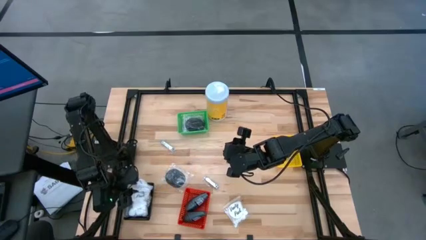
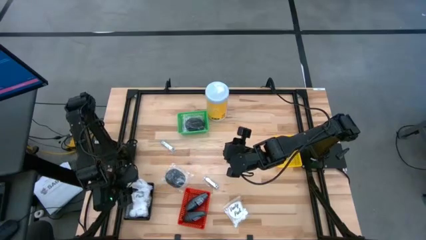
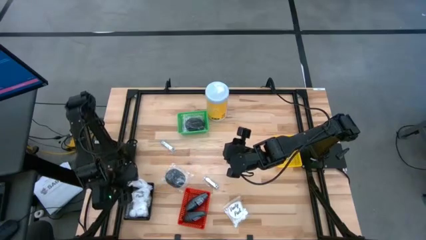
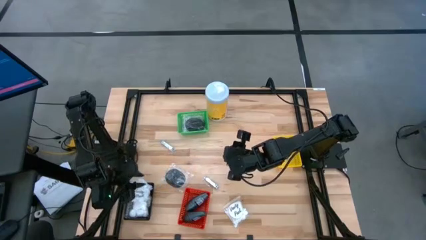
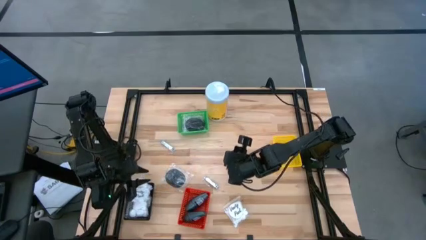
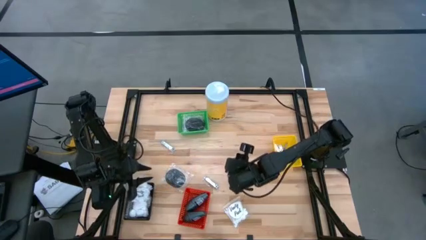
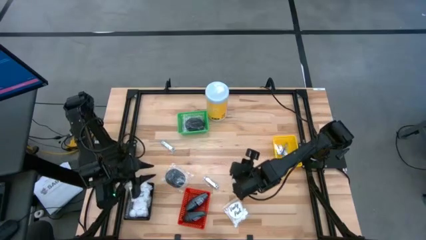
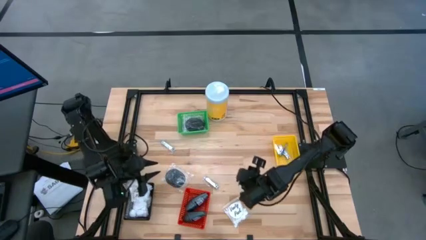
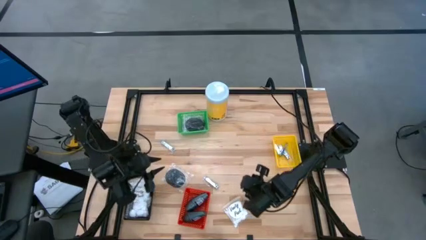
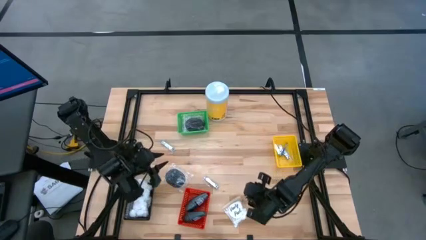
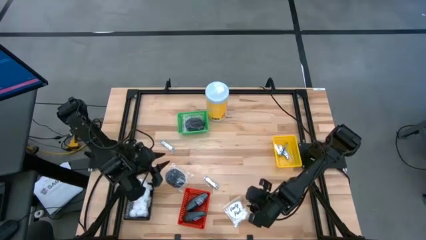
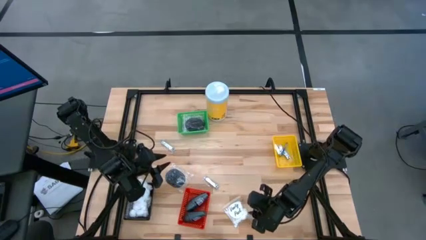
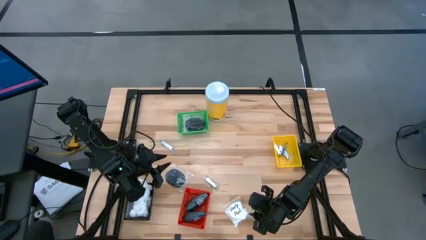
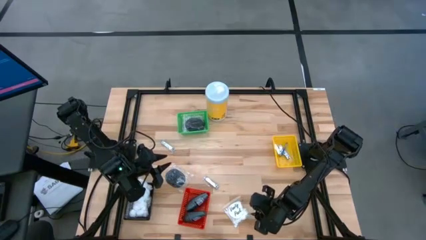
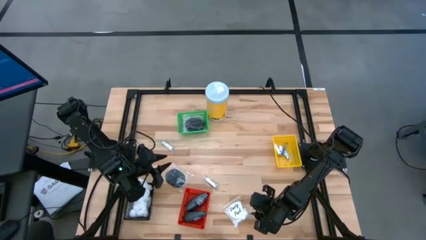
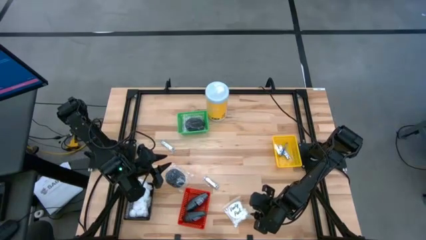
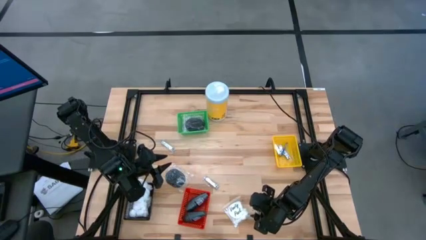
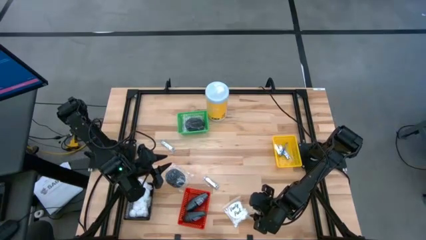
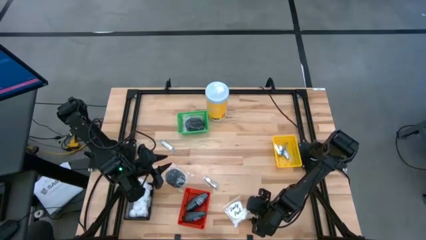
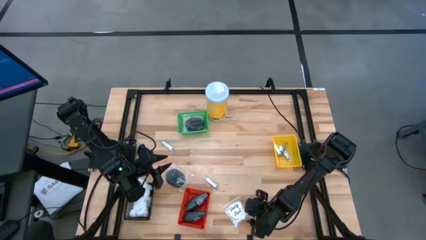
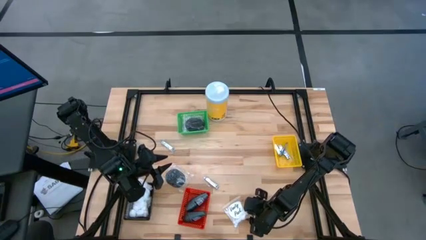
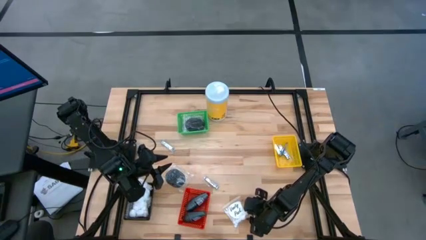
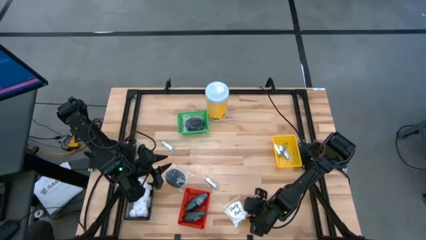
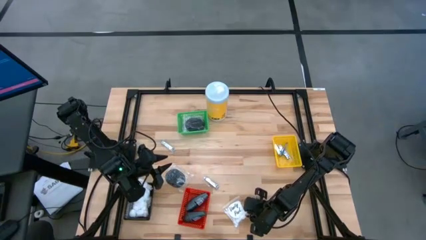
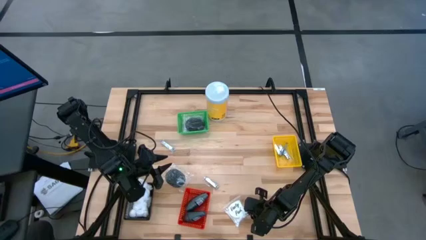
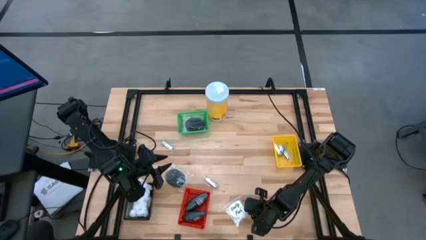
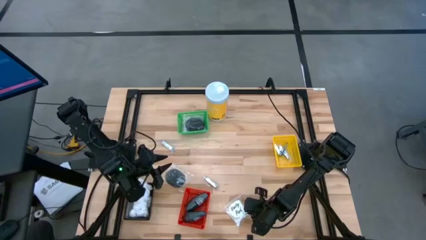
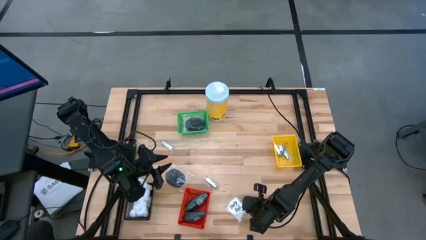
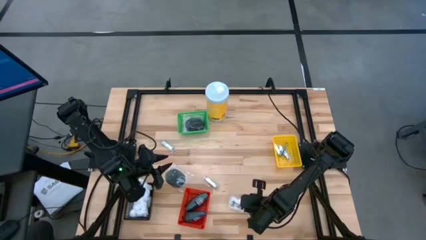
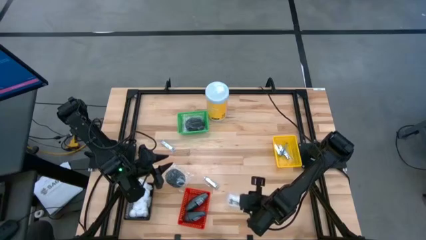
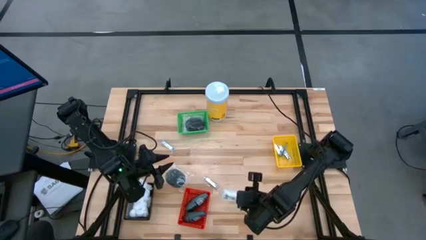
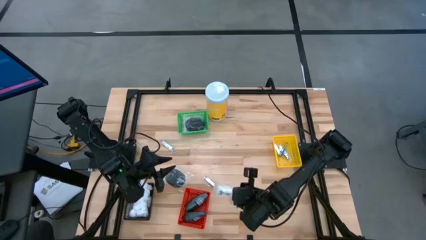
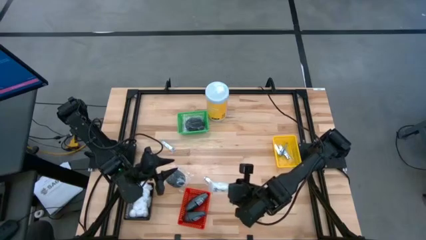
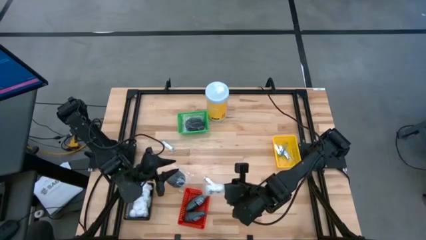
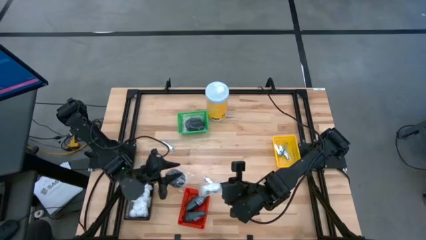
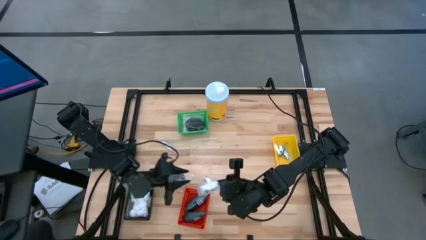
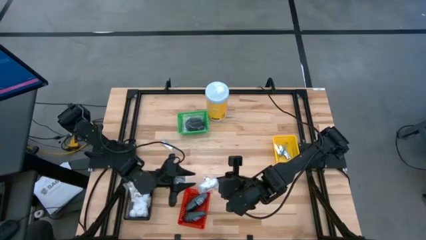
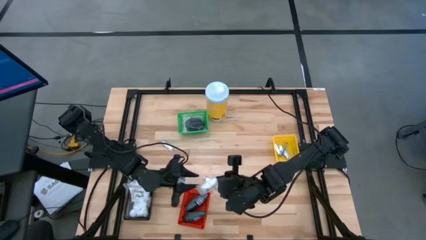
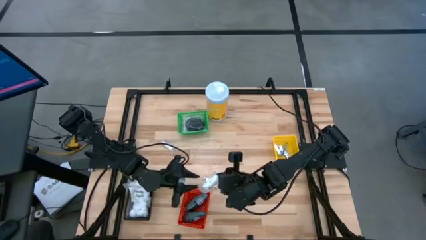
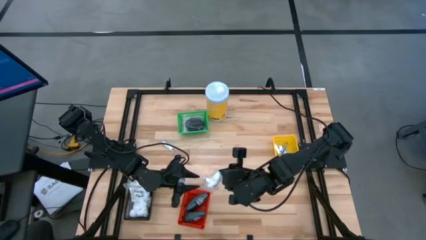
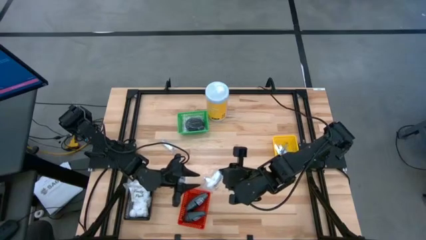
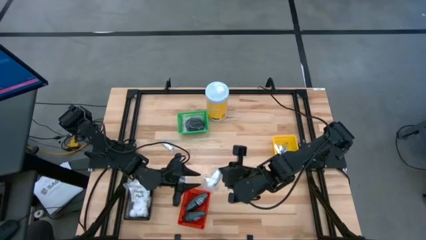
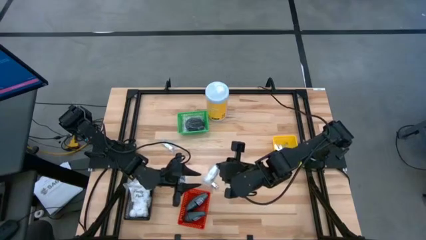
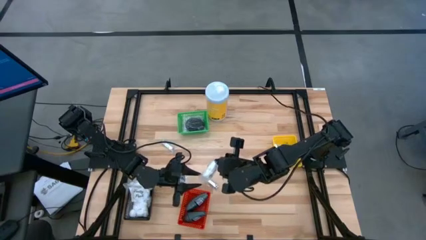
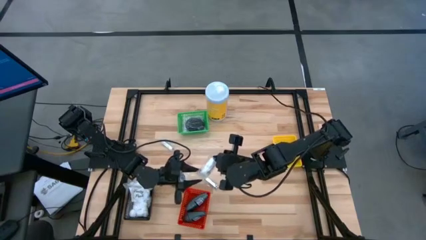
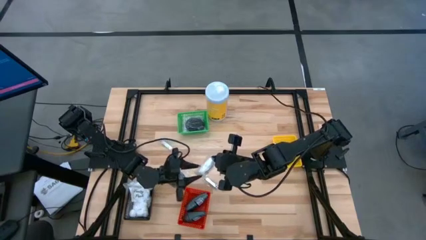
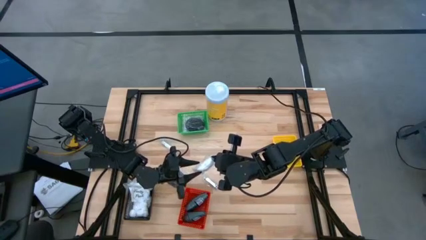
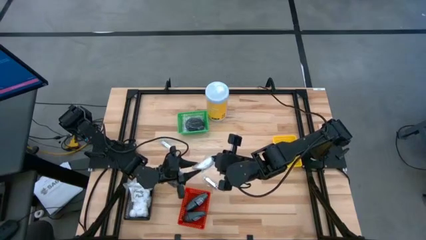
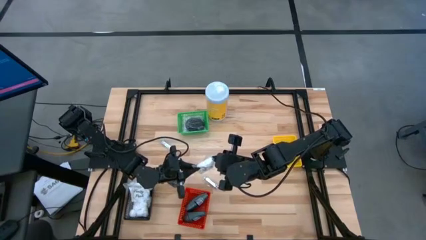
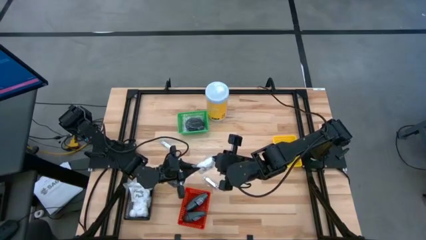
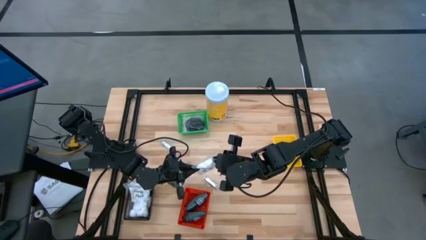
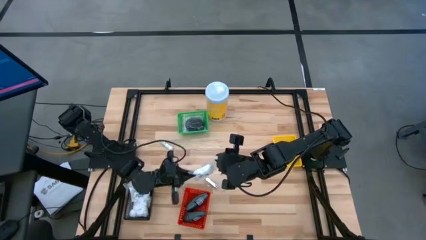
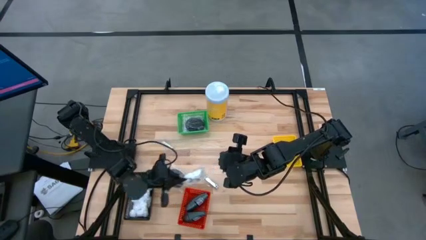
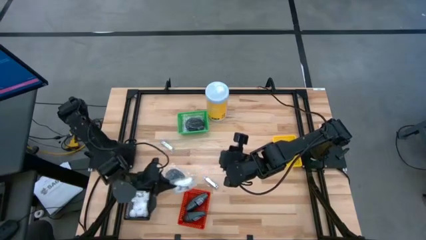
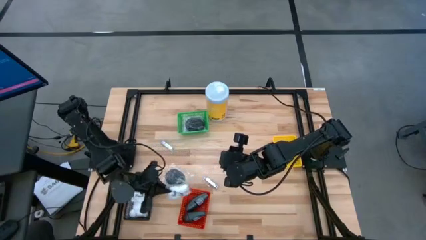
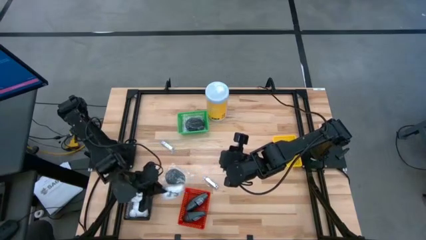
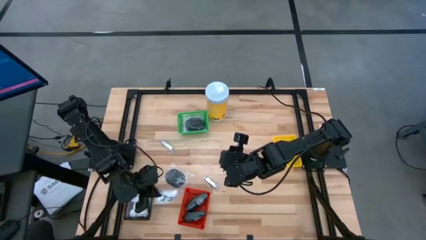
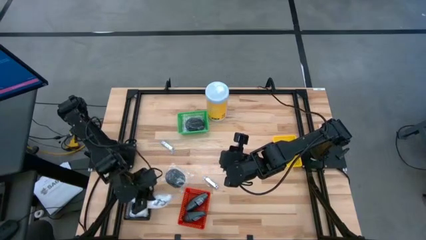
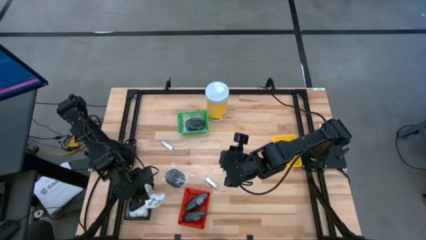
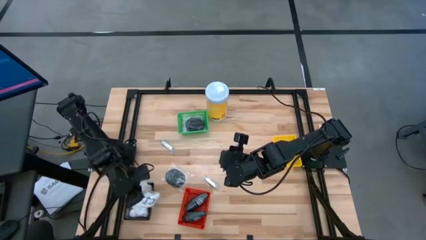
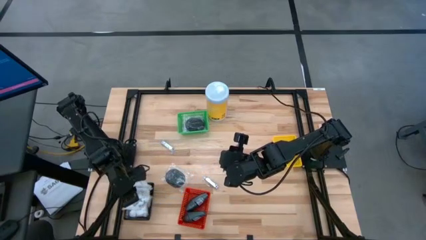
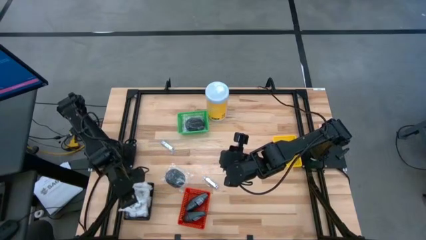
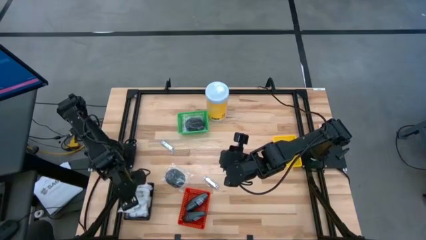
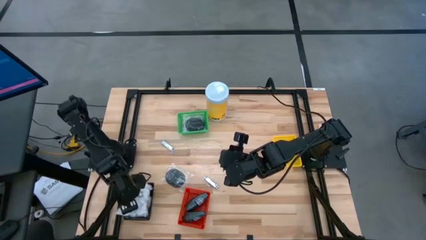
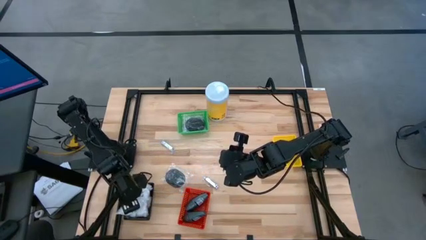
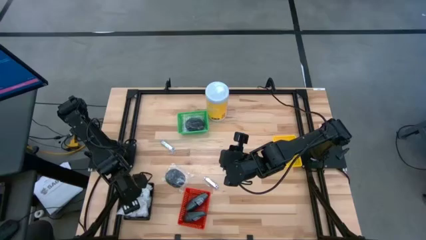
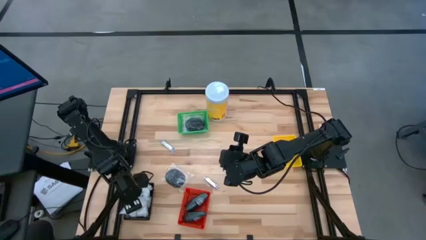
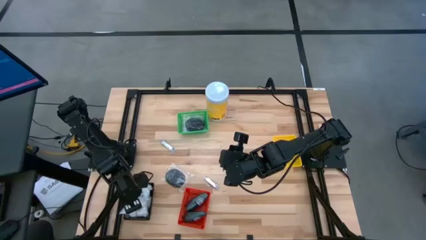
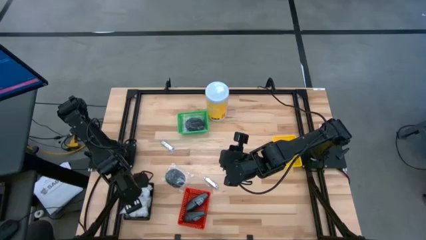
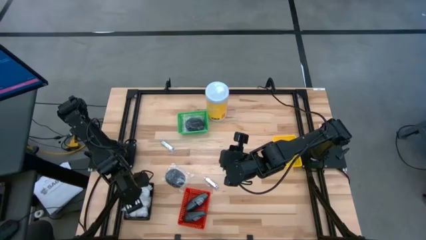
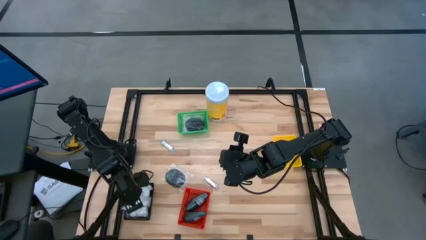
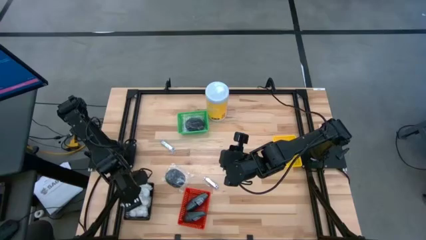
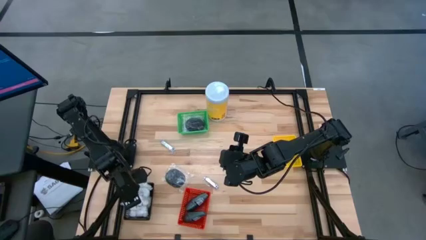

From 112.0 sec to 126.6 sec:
Task: Pick & Place Travel size toiletries
Put the white cotton pack into the black bin

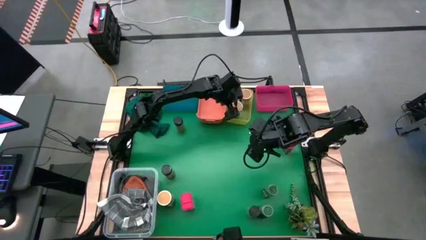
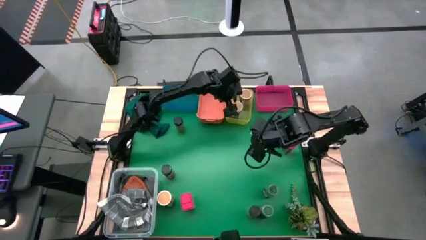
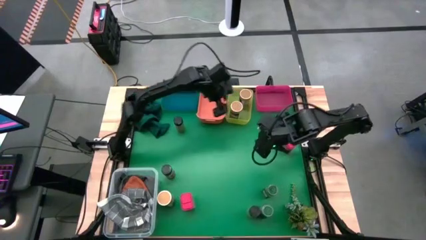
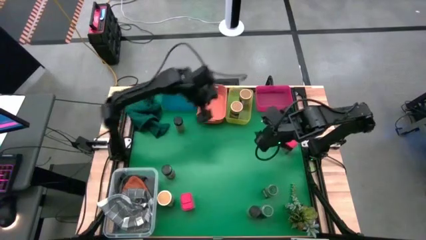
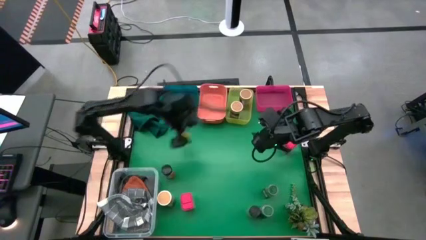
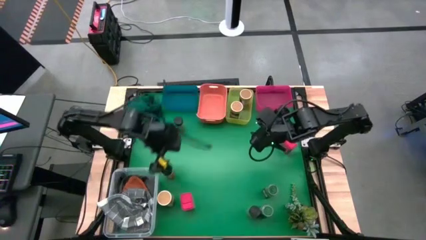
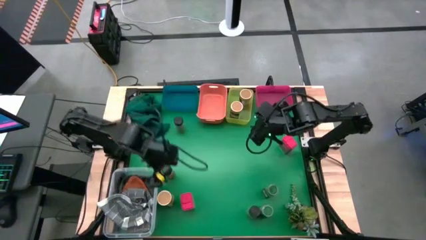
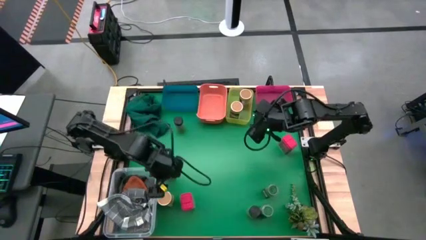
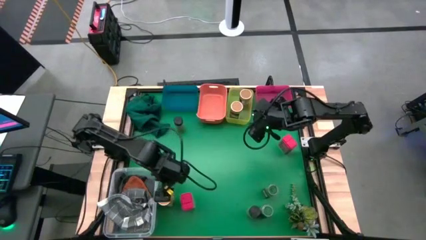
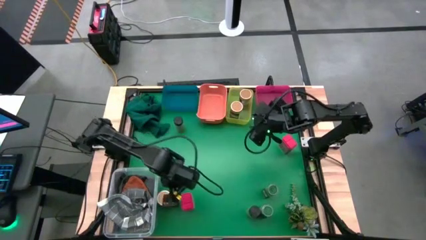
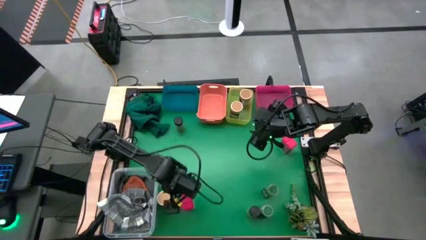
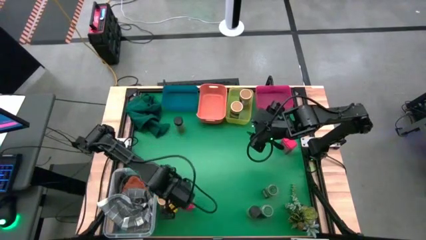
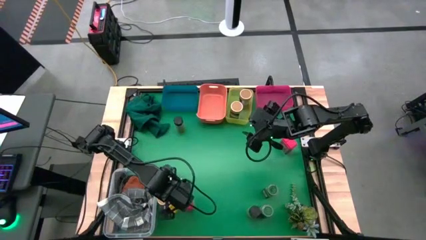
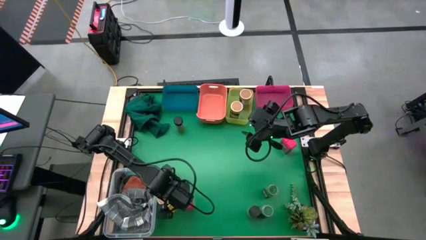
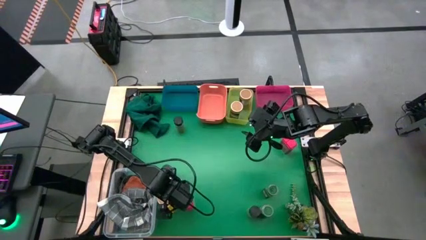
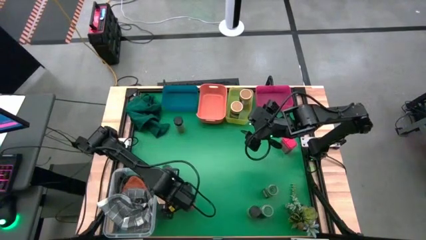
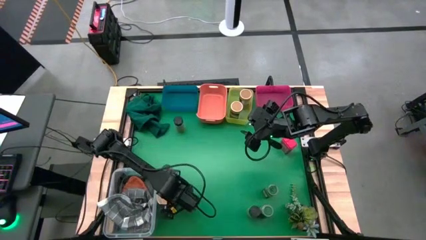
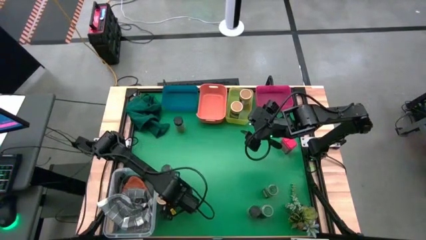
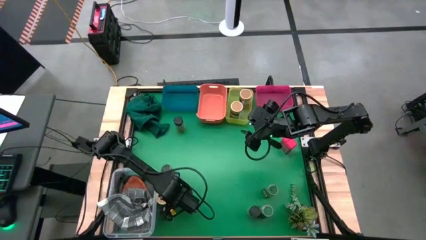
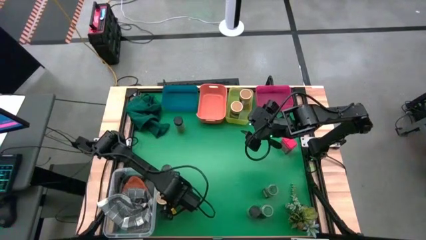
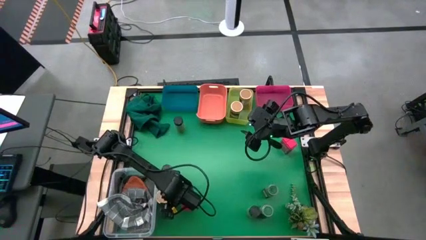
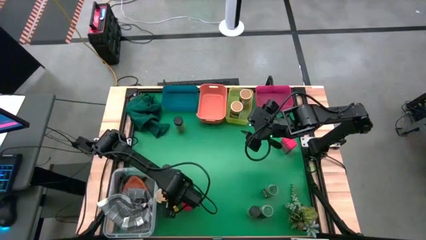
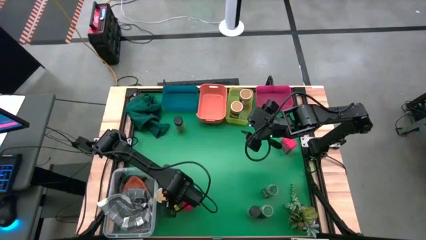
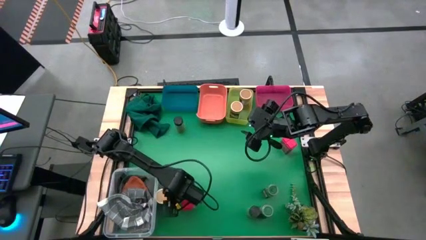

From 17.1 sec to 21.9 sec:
Task: Sort spices by type
Put the yellow seasoning bottle into the yellow bin
